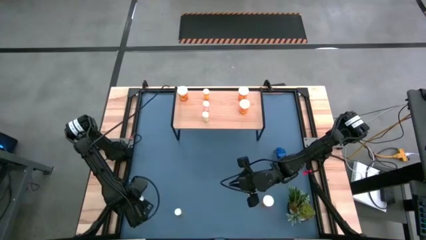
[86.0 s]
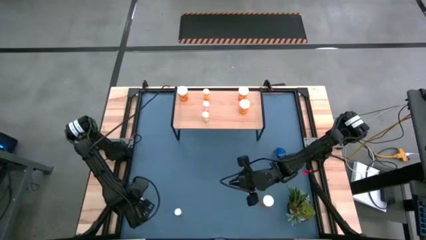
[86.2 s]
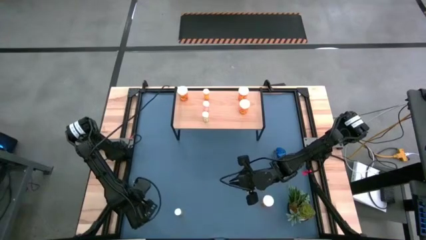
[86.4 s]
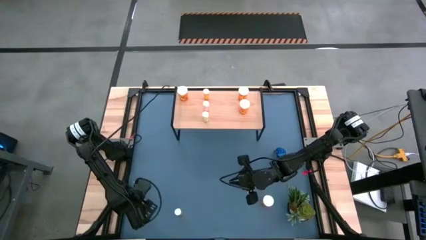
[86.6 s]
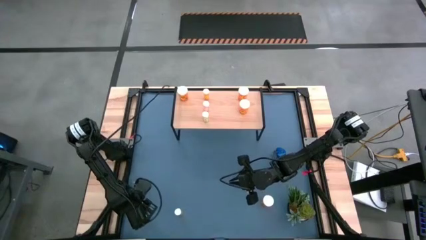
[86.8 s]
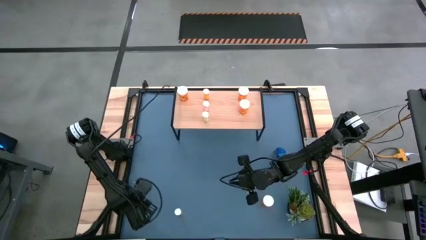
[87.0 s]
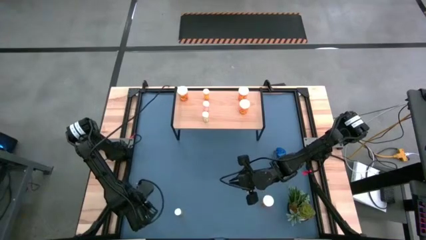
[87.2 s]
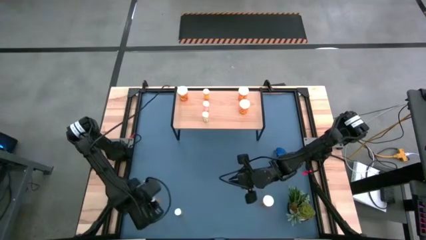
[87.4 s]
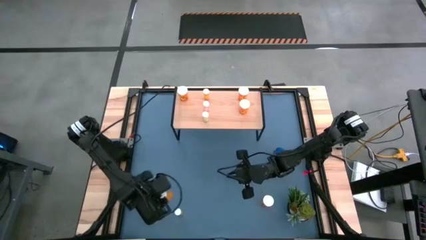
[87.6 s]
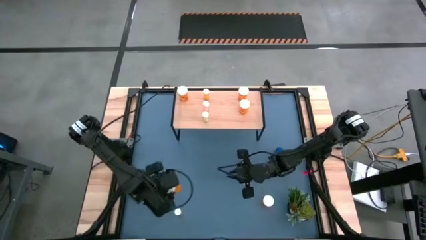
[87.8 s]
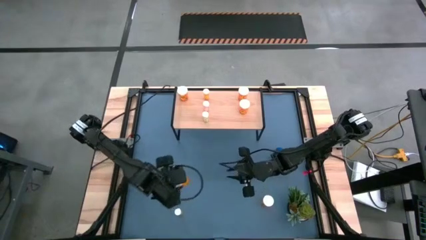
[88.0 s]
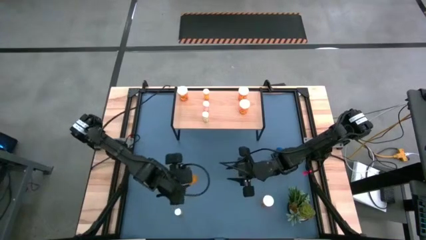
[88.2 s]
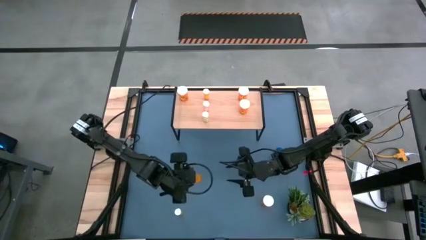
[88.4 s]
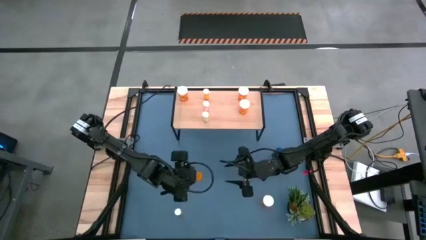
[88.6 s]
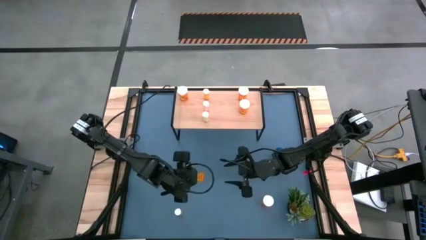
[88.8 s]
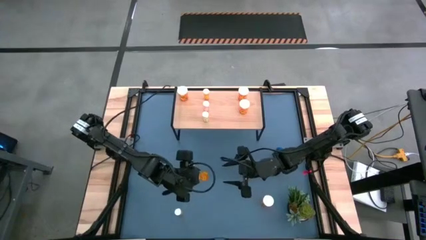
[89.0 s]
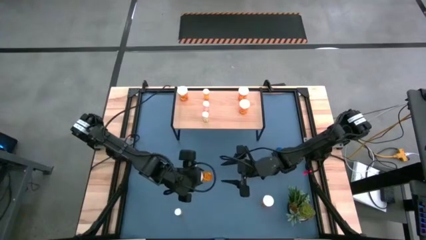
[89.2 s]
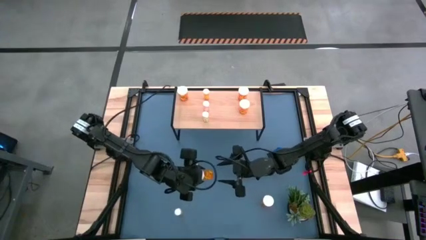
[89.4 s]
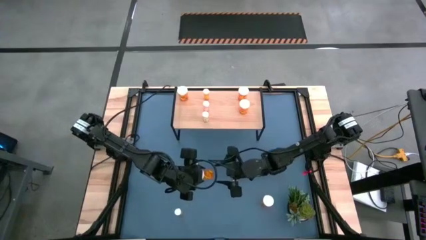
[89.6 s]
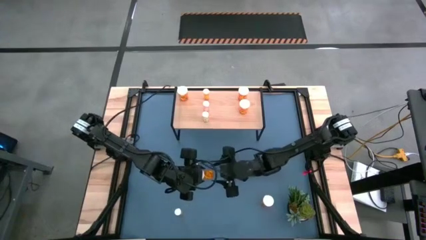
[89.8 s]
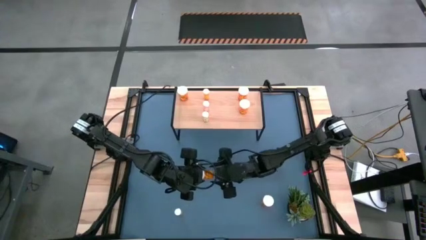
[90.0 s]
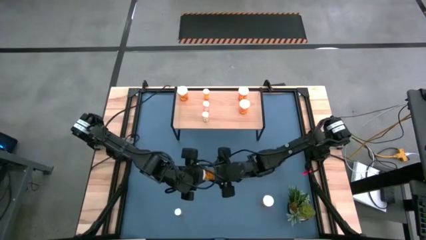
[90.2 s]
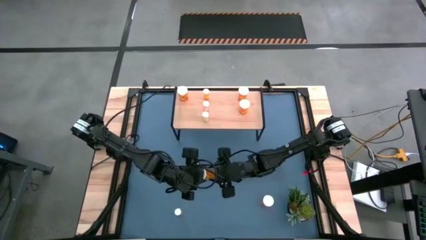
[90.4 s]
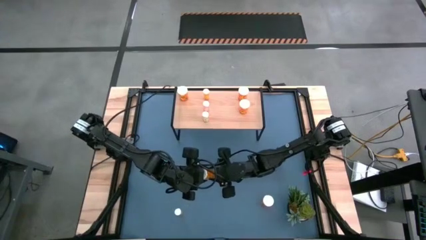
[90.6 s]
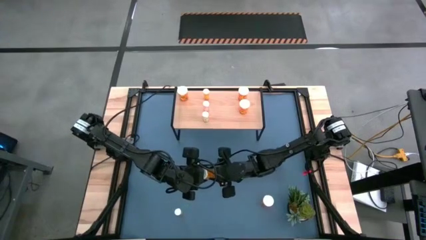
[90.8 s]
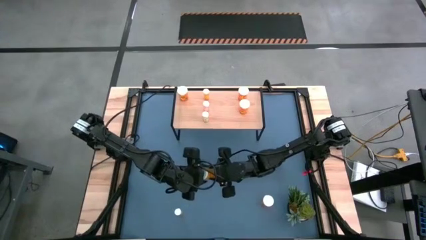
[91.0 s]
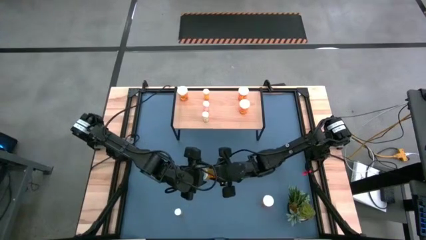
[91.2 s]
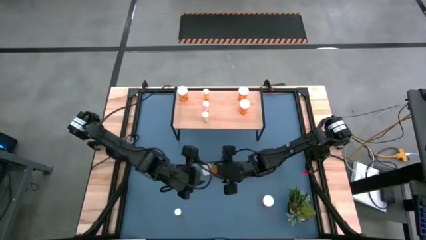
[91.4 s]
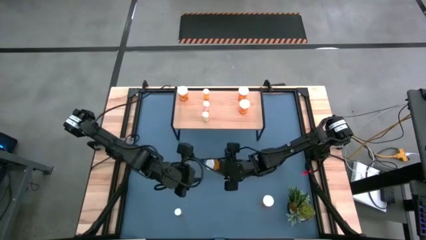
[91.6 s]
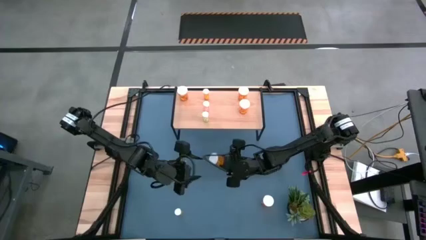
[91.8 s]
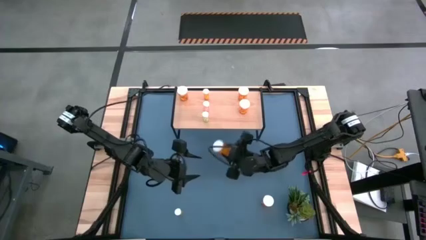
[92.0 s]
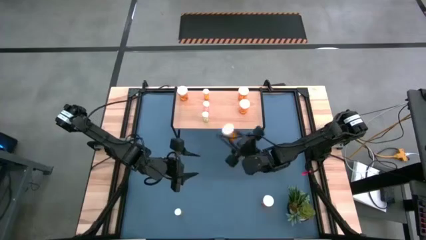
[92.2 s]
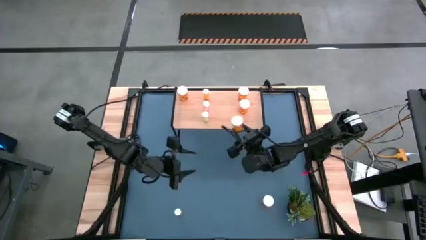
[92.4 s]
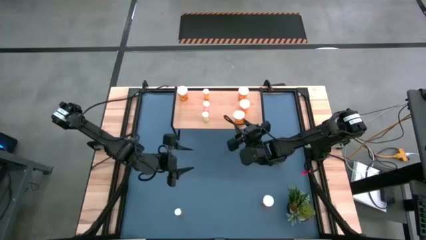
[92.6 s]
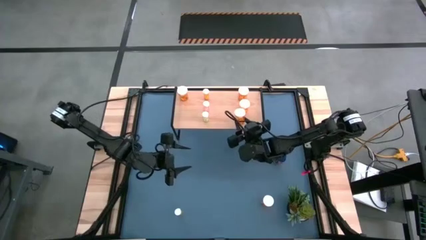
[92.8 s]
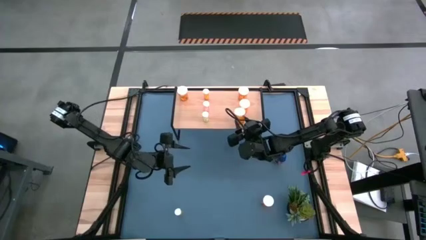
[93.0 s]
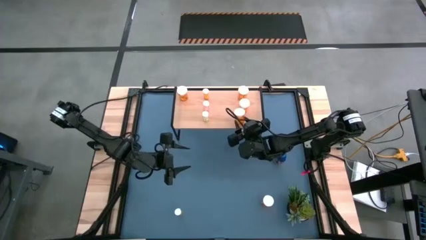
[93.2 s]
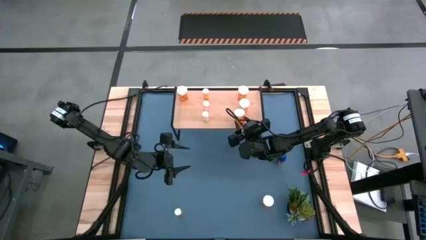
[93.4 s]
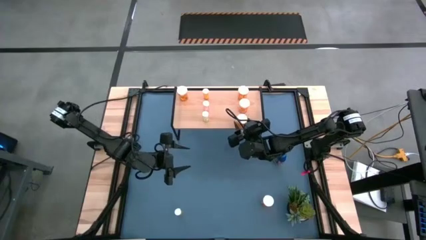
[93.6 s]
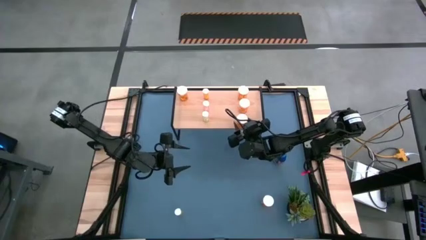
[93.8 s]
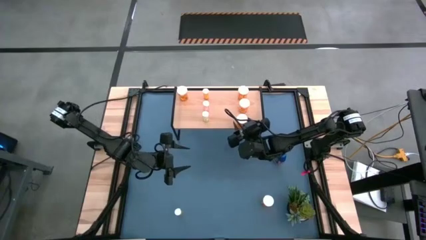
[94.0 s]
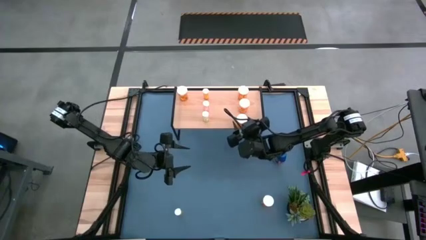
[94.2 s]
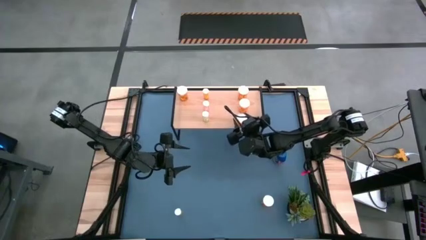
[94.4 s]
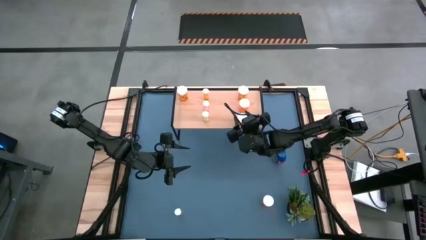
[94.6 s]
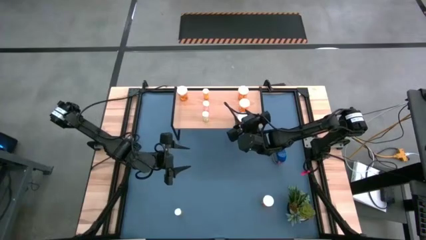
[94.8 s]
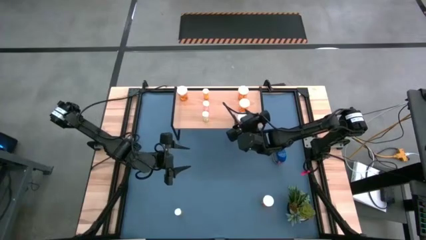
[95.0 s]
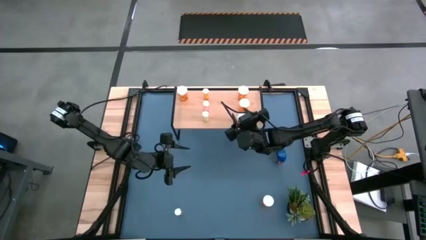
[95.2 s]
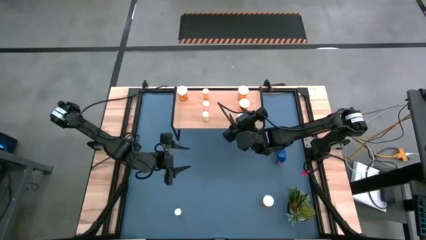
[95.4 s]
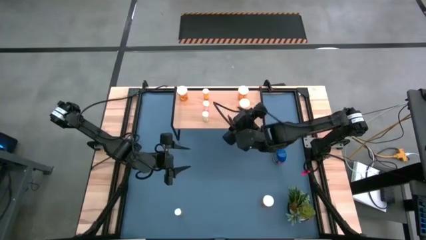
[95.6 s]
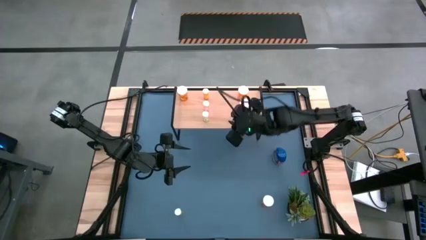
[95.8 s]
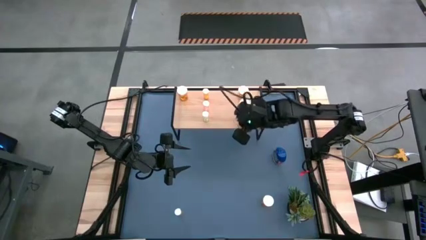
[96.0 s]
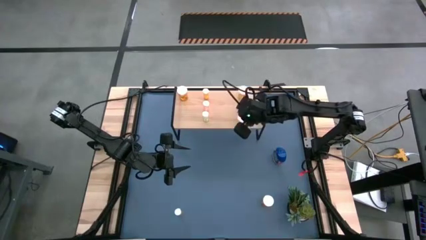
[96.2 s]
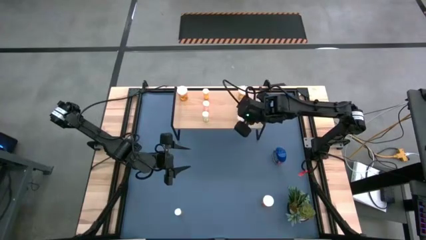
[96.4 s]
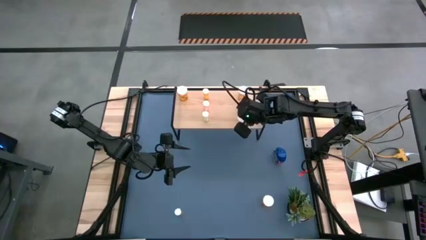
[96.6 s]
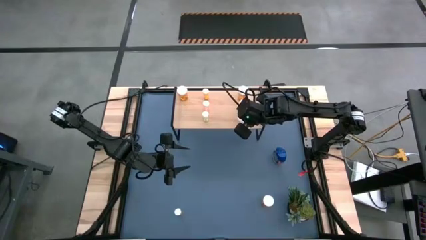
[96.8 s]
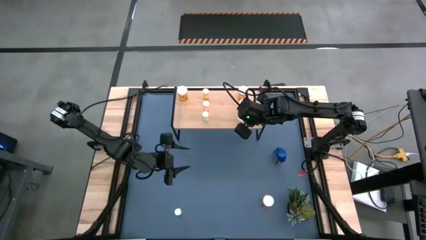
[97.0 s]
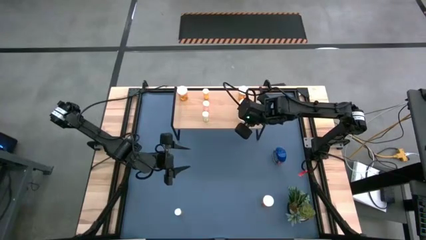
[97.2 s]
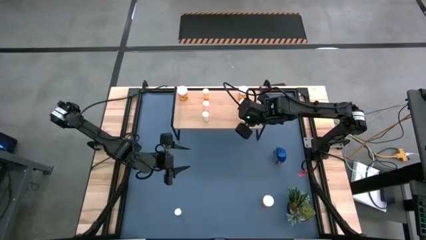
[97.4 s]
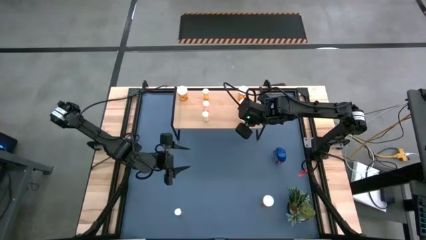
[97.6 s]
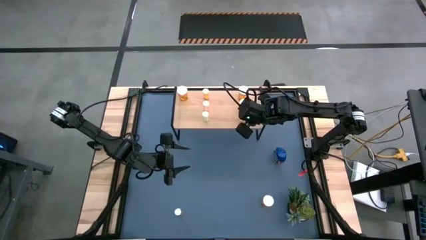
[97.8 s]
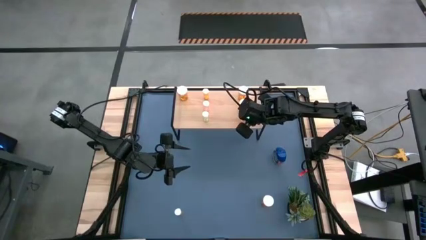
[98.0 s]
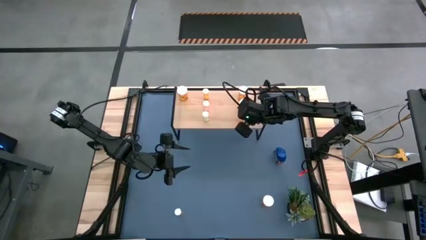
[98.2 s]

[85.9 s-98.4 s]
Task: Pick and place medicine bottles onto shelf by color
Align the large orange pill bottle with the other large orange pill bottles on the shelf
